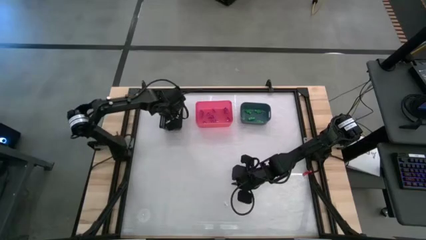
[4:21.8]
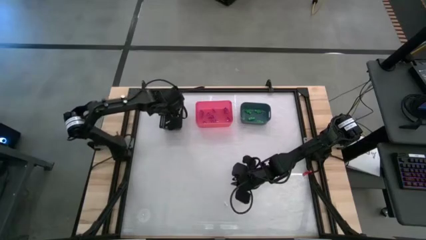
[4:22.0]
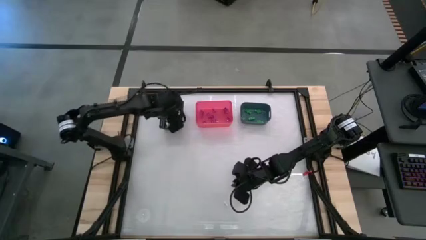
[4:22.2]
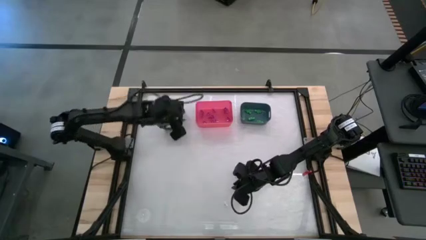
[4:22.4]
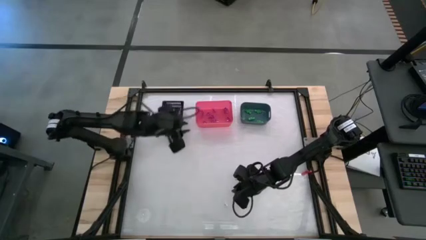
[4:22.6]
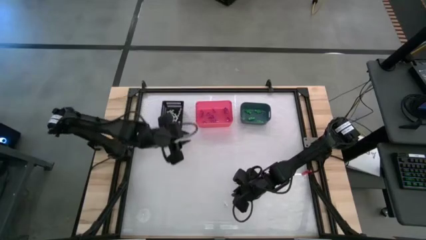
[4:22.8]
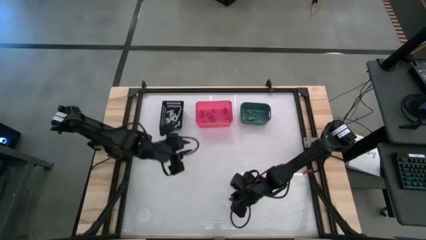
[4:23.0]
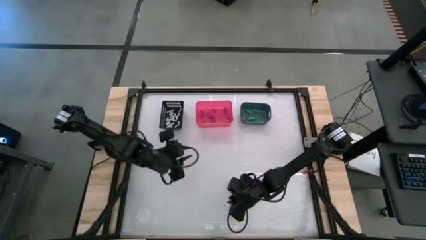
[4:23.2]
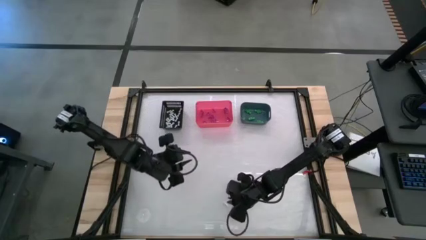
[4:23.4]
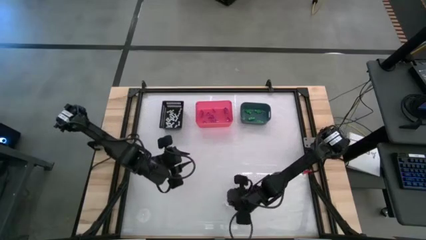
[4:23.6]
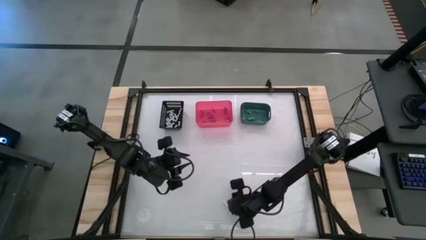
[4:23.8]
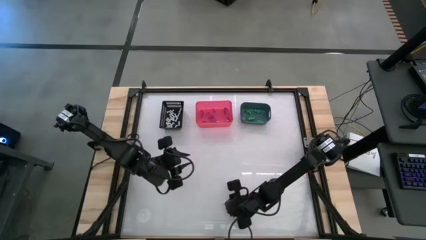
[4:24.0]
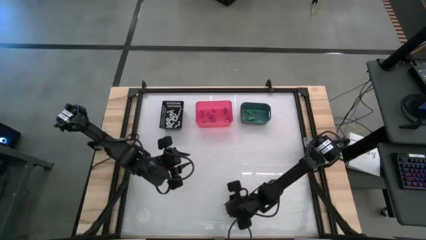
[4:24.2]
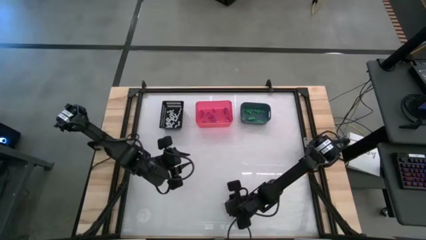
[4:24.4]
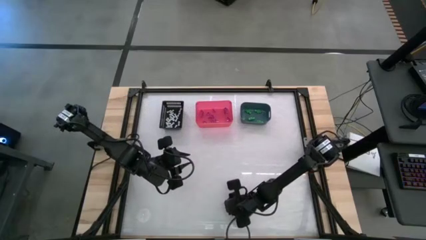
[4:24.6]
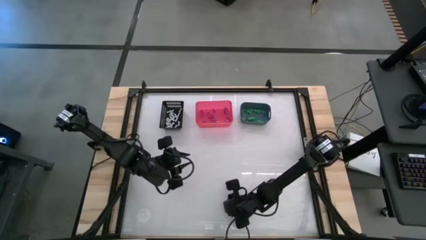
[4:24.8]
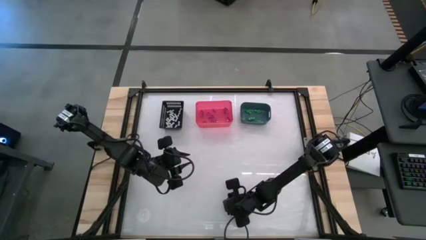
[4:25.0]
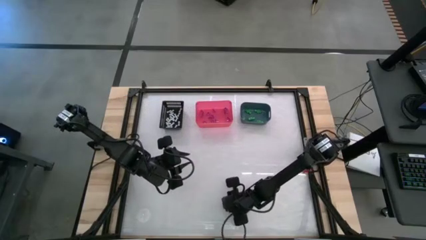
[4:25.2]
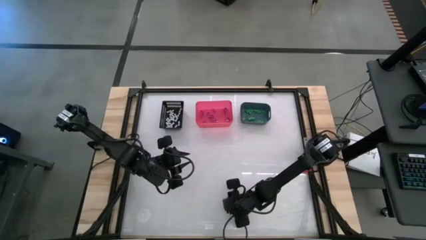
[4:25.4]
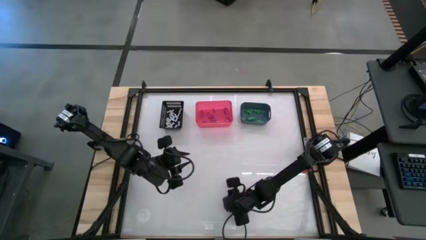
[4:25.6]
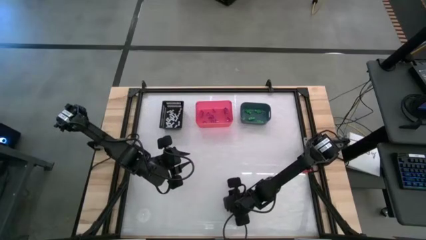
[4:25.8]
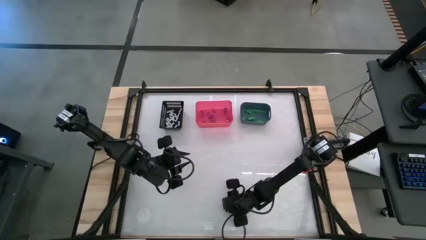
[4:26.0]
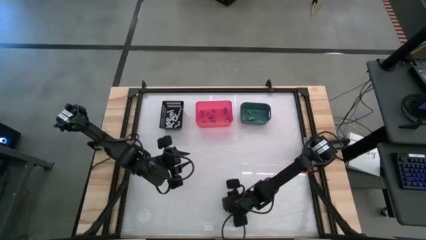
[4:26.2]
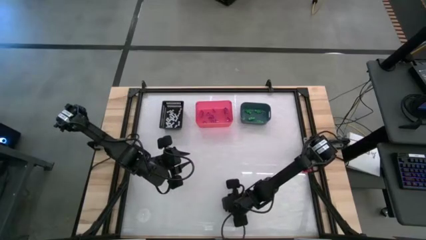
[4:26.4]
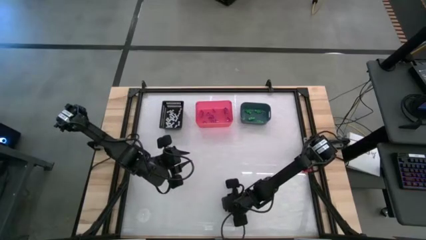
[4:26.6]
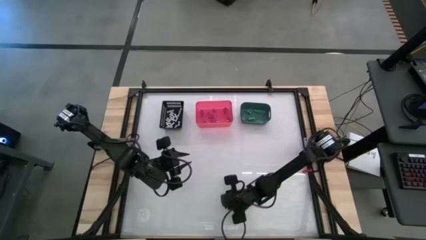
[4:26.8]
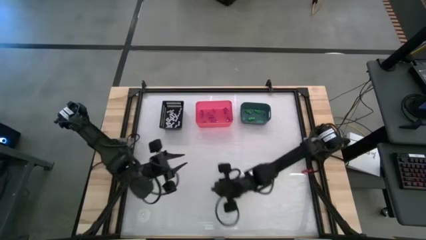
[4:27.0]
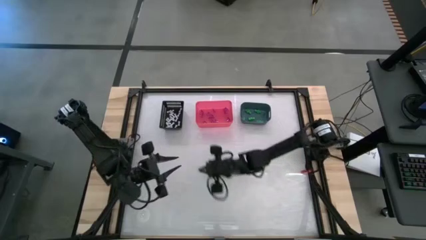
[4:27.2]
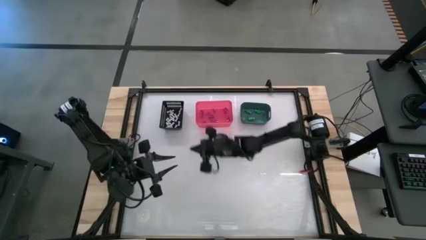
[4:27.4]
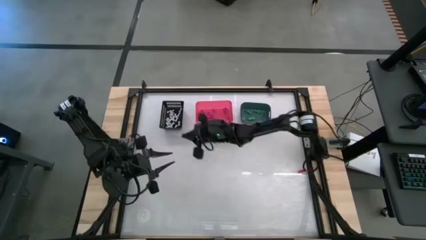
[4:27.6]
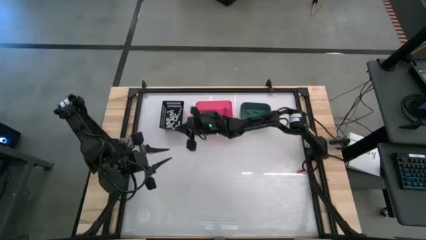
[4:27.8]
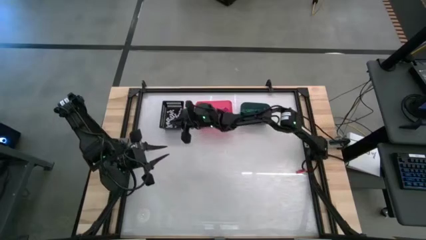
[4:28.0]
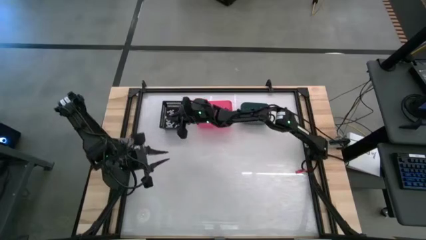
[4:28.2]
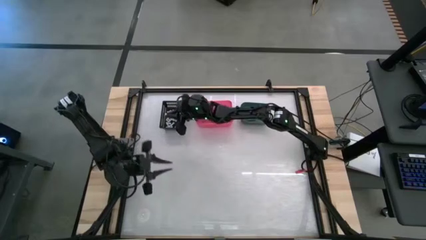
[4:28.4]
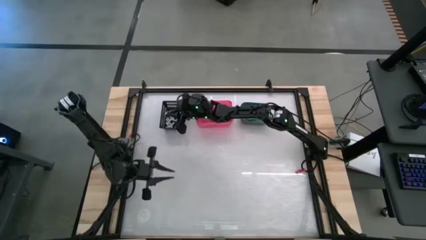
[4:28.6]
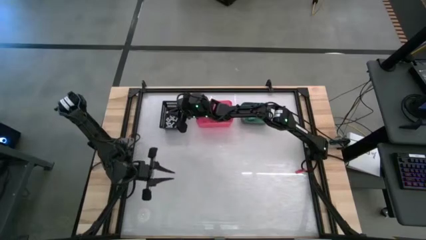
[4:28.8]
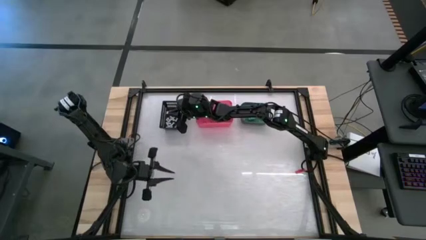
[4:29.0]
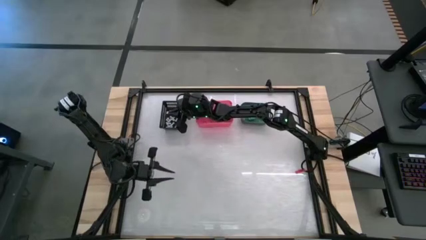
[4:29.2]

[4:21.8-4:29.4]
Task: Sort Halloween decoration
Put the white bone toy into the black bin

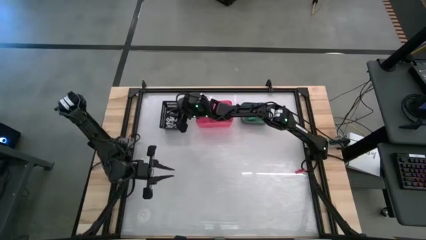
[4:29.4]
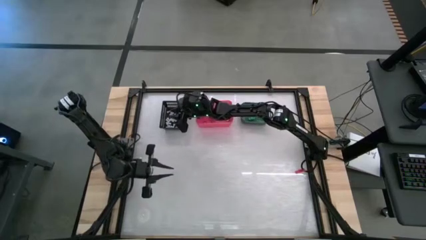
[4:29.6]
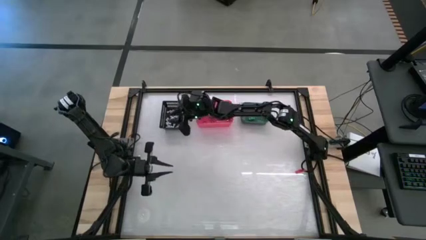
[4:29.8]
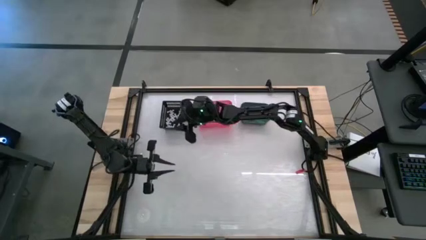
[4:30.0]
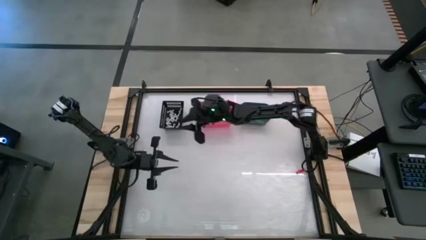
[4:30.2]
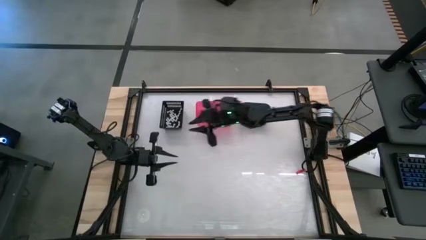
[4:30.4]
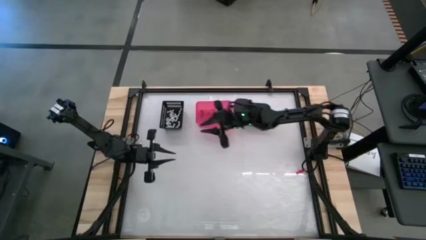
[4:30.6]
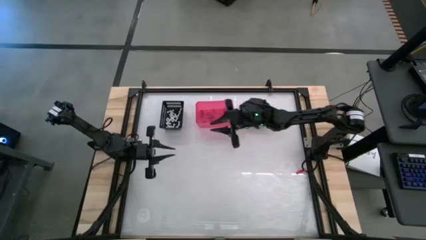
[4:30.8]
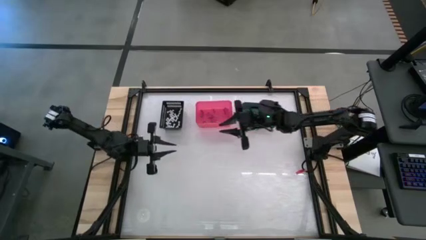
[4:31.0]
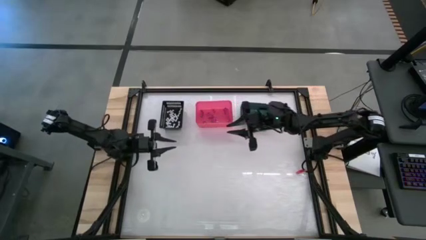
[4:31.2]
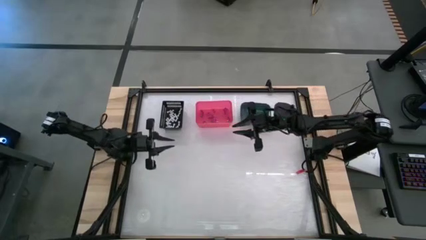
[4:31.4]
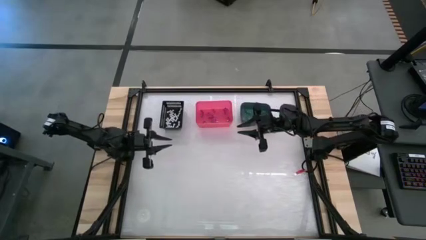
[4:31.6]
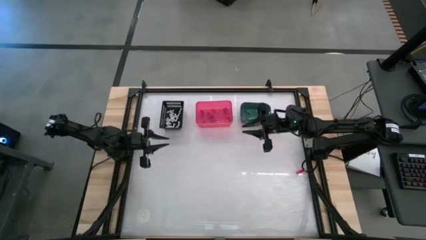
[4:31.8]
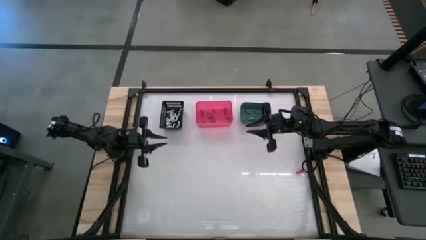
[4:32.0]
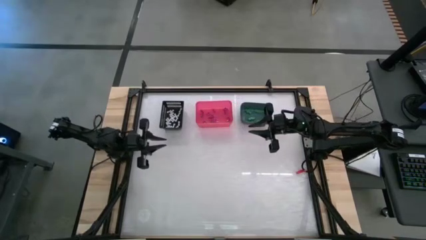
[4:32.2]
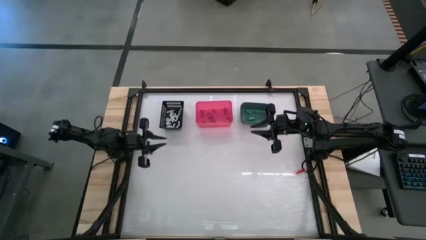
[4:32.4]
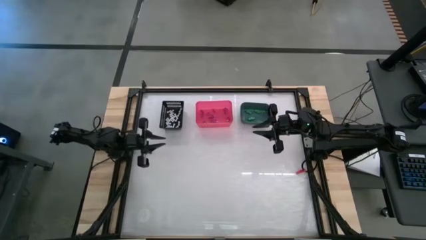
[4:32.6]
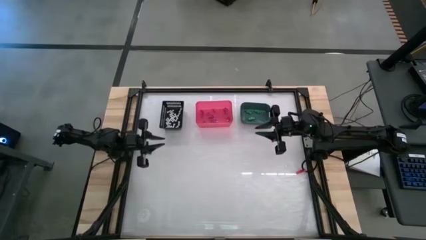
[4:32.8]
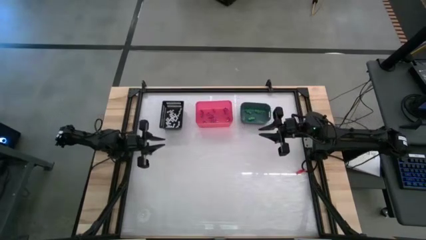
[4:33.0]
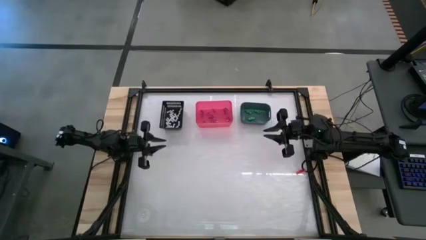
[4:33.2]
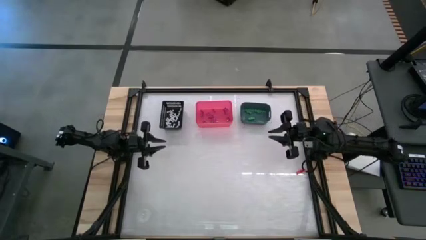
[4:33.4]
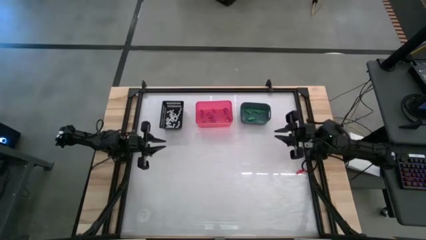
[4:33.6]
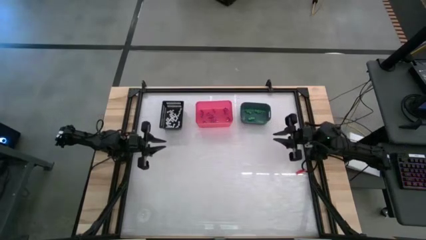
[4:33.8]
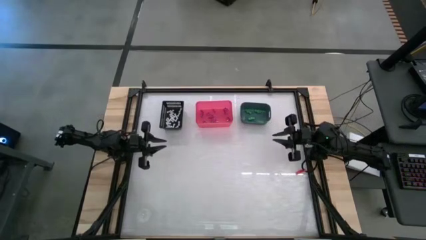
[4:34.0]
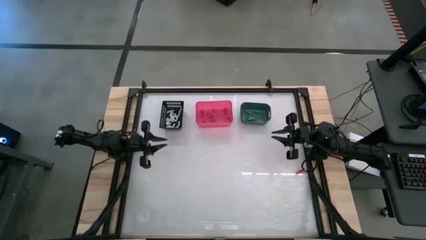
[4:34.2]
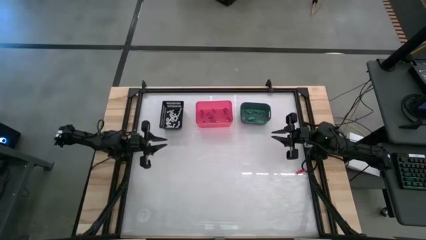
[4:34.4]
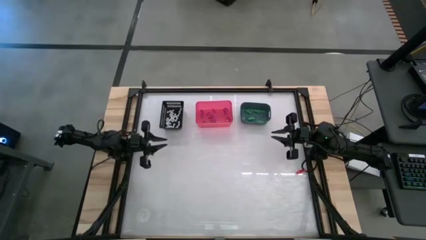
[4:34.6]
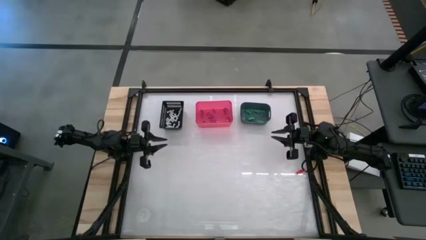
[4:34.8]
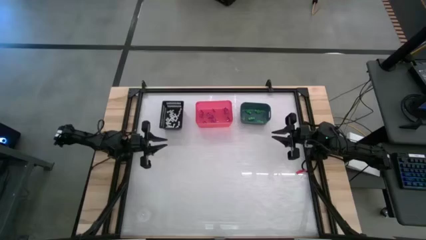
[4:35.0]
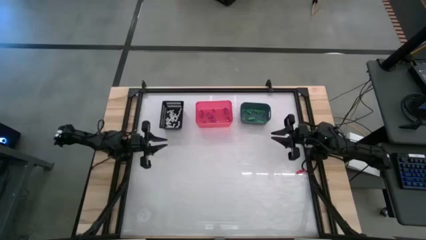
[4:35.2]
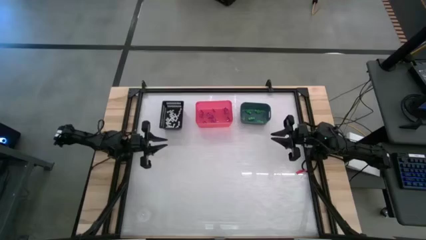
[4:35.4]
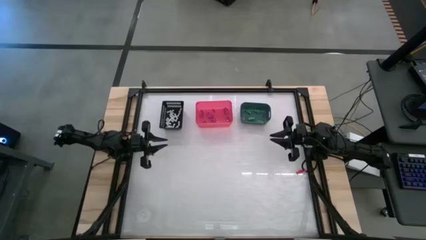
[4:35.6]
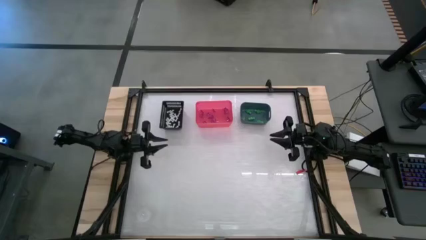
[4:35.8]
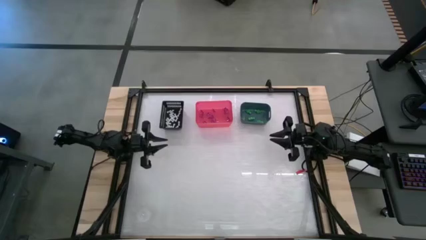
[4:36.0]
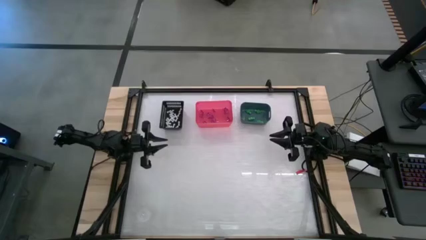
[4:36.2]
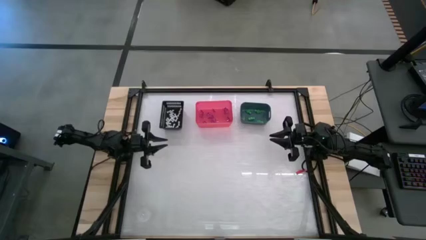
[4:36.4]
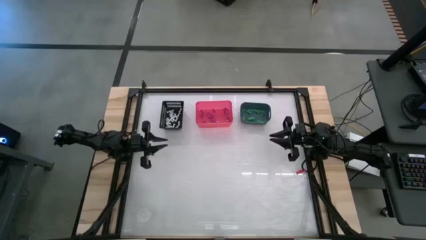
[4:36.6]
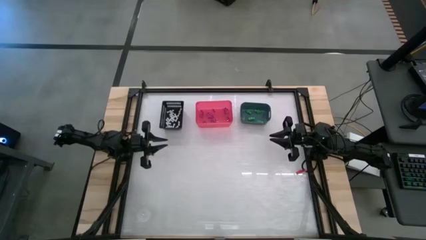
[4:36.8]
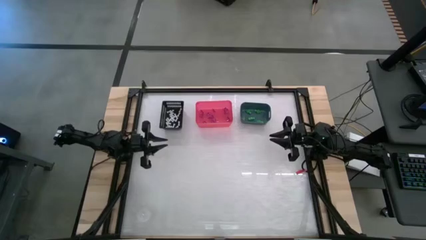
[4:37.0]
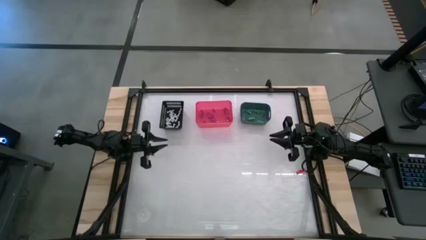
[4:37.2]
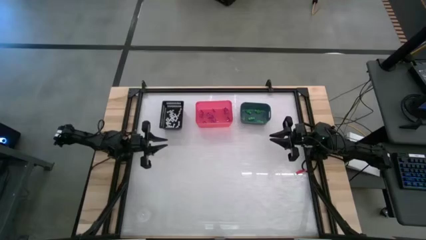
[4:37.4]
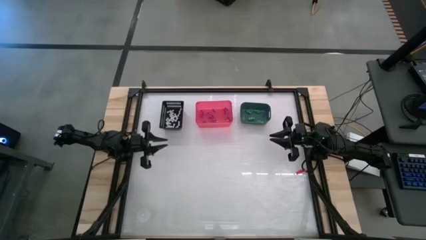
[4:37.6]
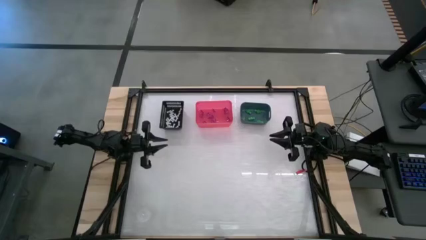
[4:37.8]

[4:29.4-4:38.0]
Return to Home Position
